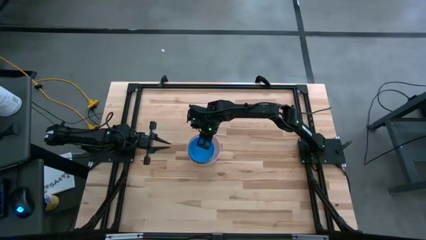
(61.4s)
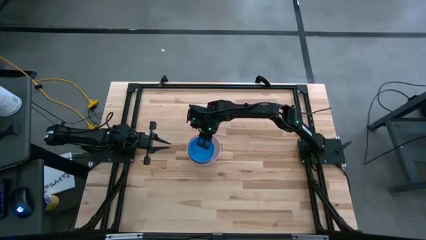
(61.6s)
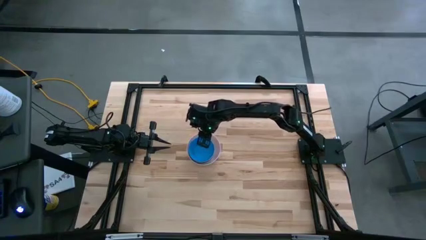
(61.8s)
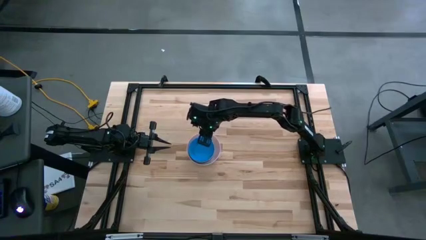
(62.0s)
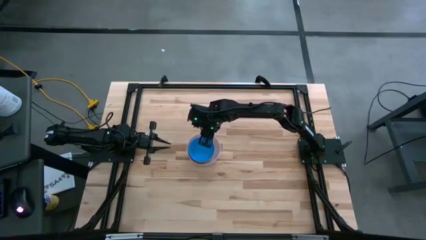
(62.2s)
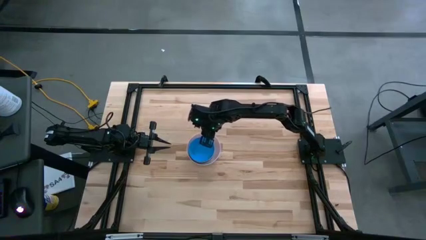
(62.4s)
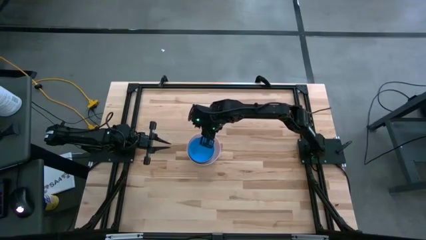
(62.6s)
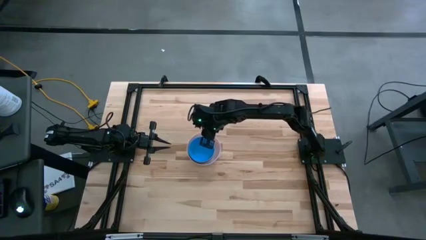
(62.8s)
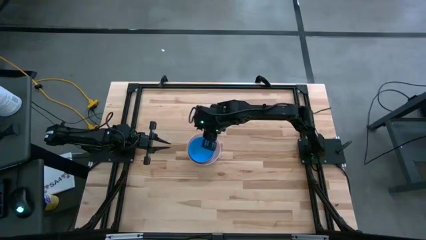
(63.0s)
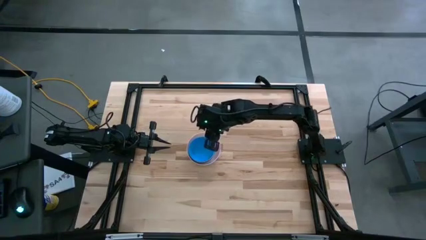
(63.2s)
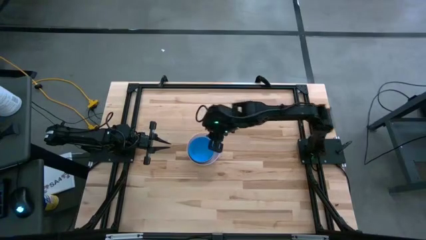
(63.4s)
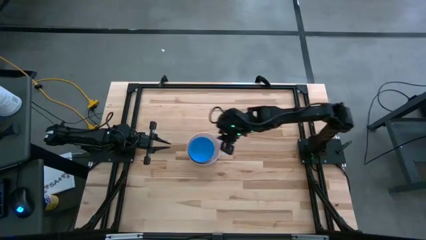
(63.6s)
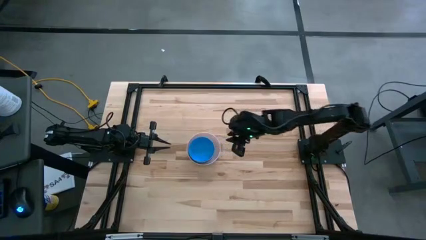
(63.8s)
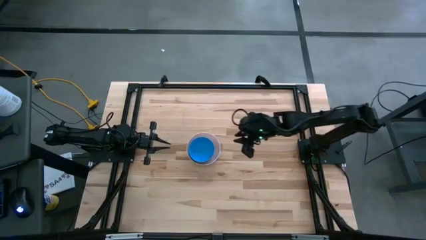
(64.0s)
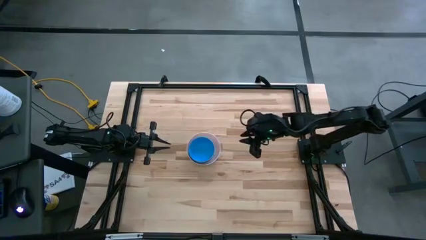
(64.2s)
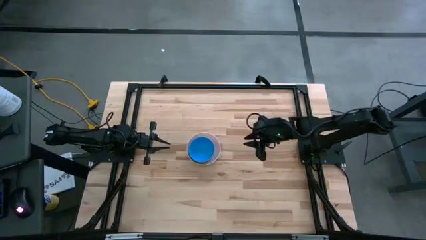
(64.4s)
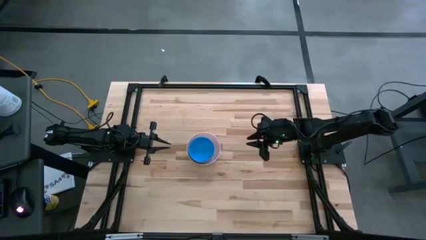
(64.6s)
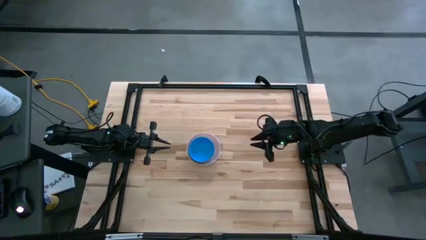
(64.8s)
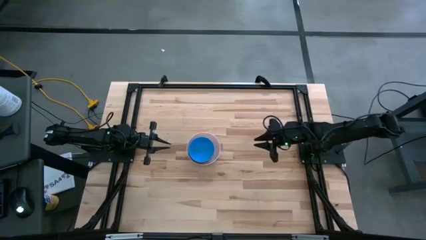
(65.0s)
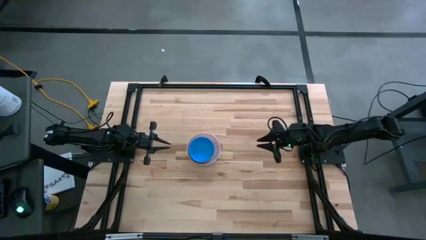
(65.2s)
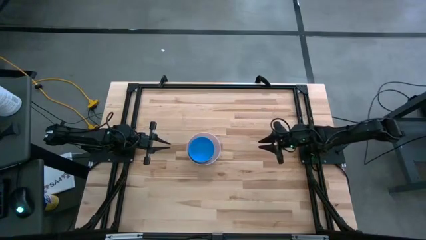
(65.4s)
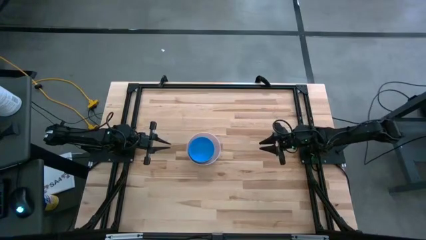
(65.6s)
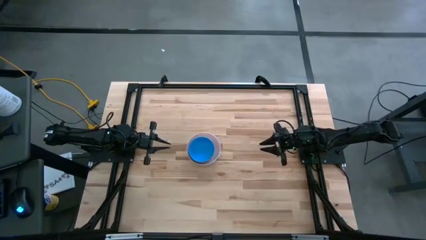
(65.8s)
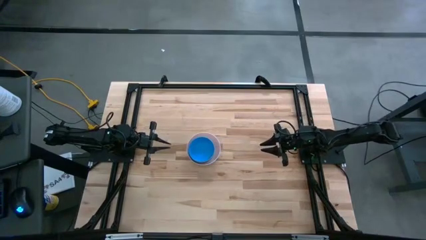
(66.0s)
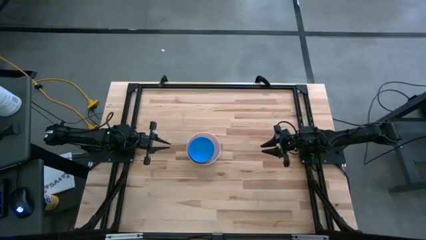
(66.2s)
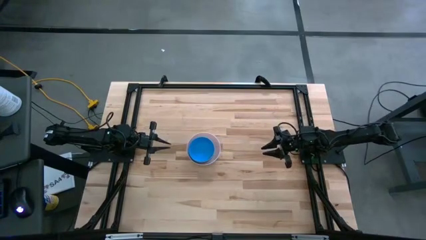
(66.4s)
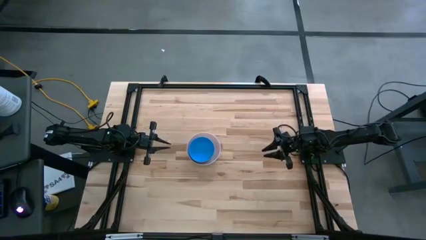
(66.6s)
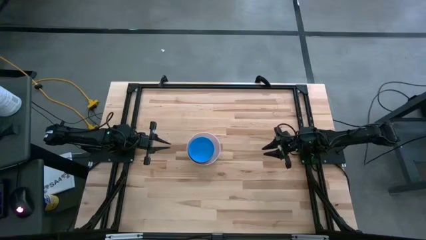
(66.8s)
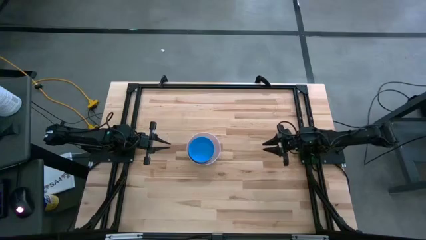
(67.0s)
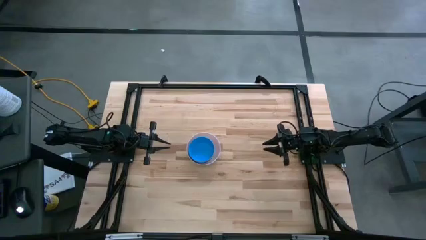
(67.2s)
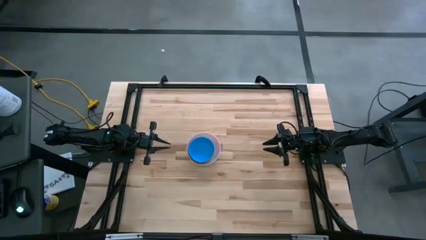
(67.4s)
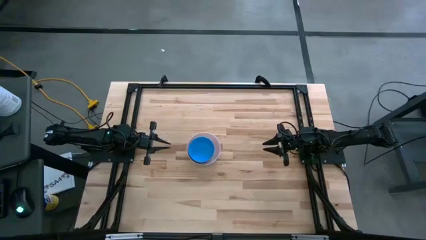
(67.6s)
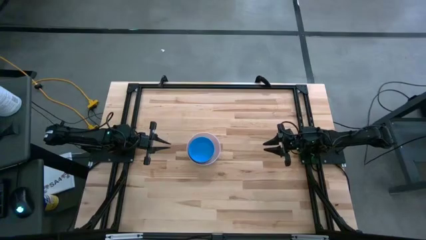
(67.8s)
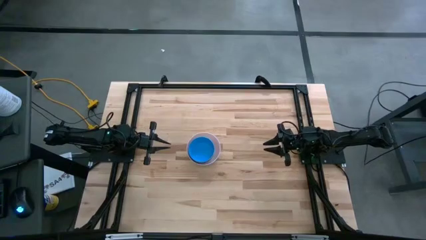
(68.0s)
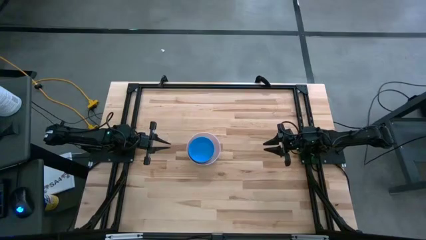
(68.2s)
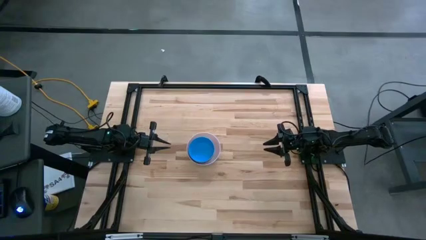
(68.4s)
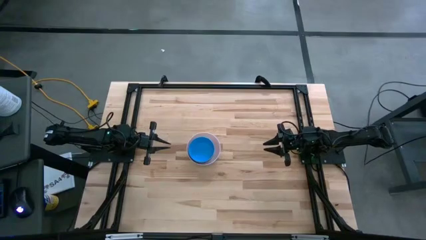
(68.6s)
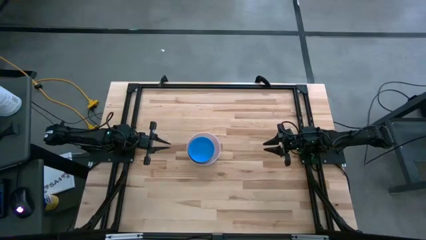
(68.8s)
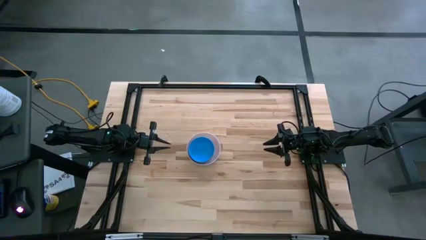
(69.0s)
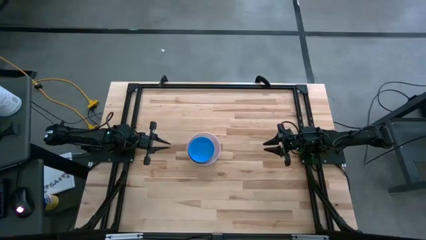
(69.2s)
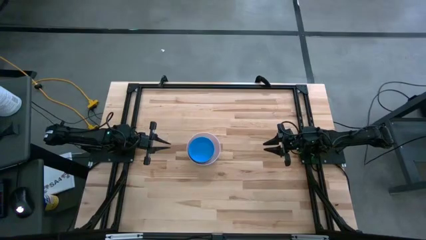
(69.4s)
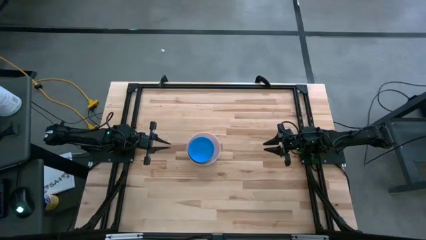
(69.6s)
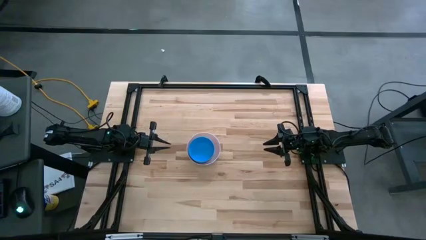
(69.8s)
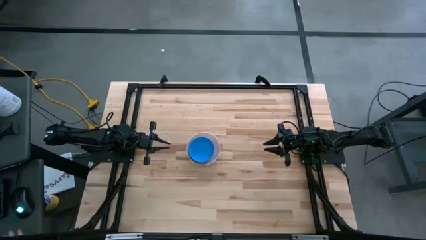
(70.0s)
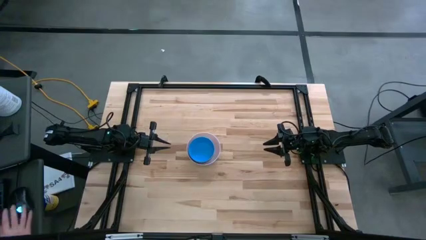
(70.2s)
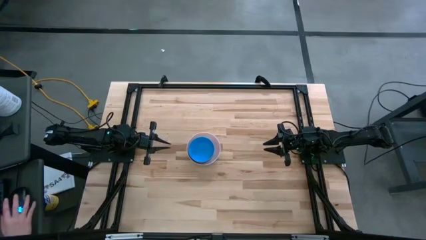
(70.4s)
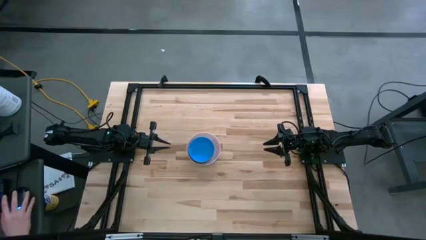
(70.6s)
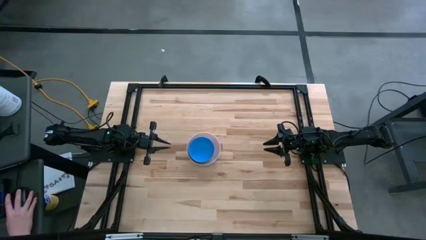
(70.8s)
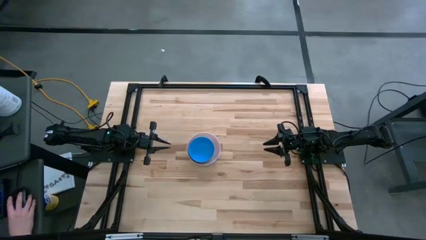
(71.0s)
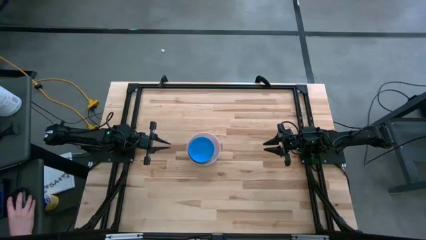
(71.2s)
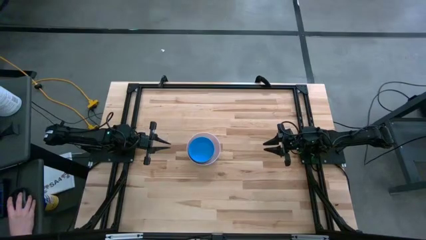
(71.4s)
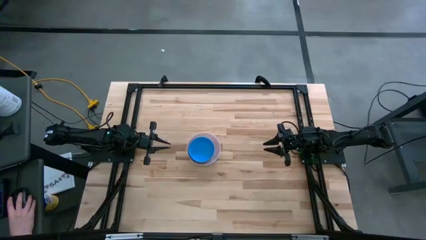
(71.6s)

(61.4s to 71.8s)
Return to Home Position

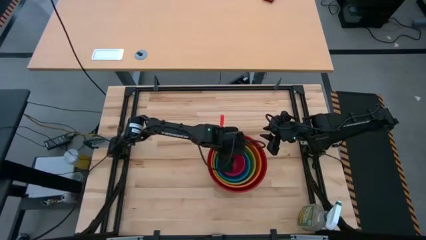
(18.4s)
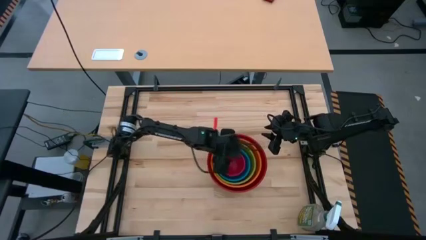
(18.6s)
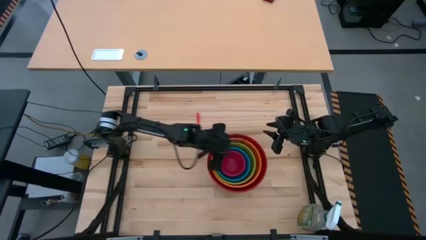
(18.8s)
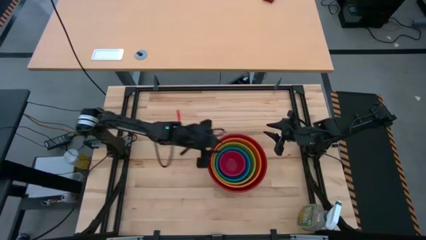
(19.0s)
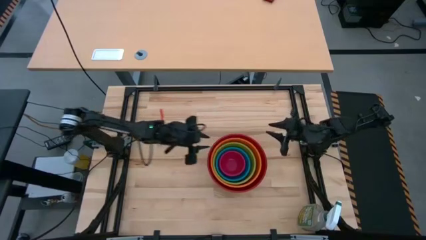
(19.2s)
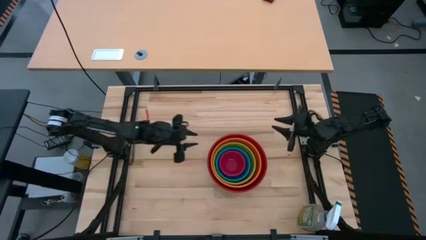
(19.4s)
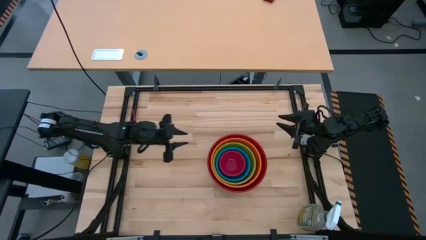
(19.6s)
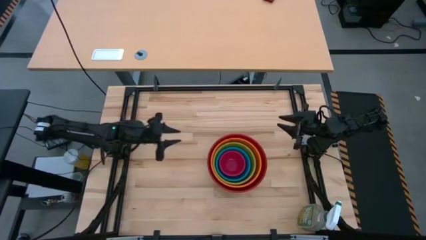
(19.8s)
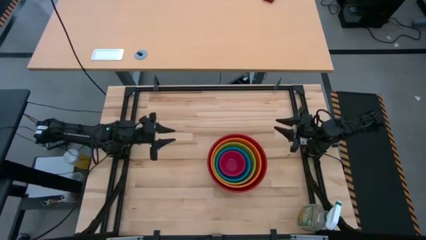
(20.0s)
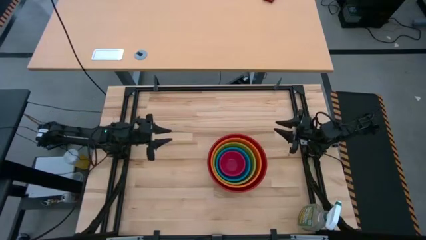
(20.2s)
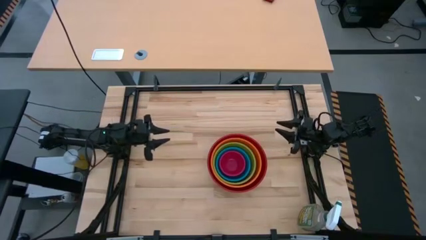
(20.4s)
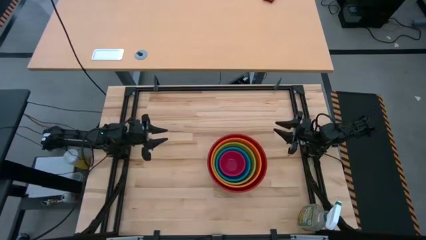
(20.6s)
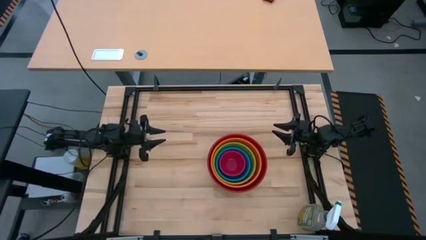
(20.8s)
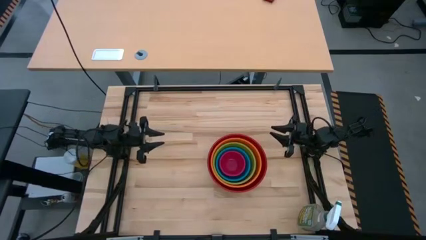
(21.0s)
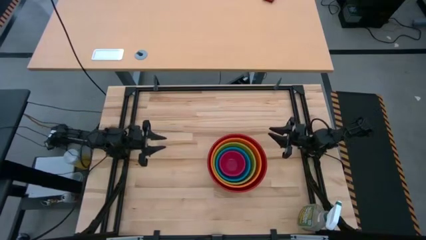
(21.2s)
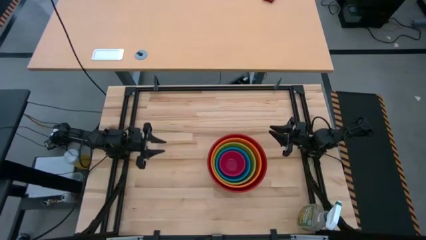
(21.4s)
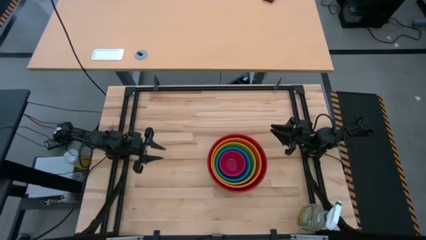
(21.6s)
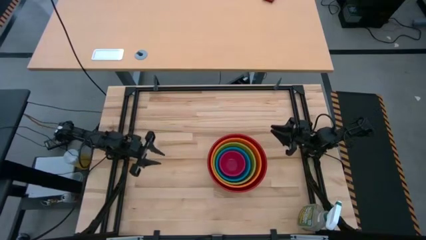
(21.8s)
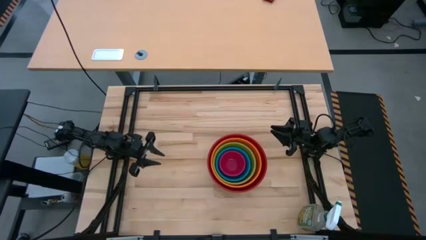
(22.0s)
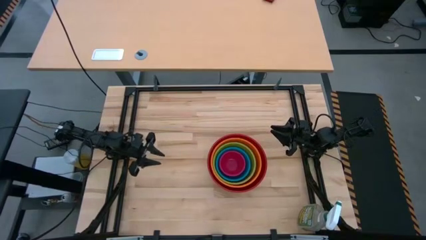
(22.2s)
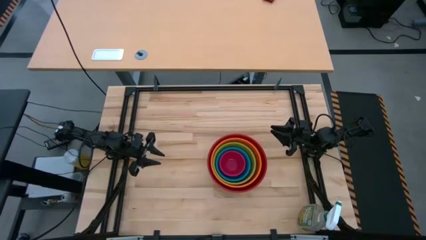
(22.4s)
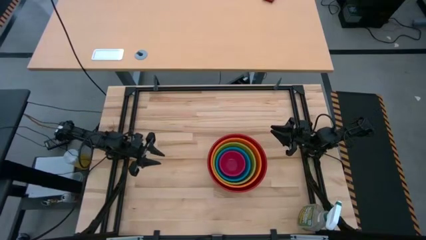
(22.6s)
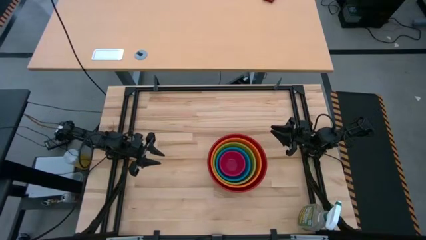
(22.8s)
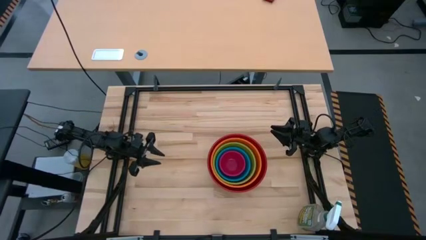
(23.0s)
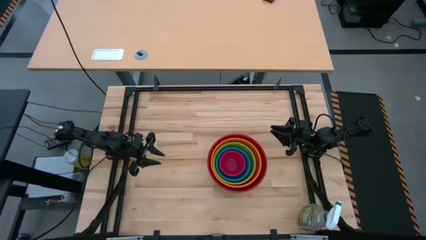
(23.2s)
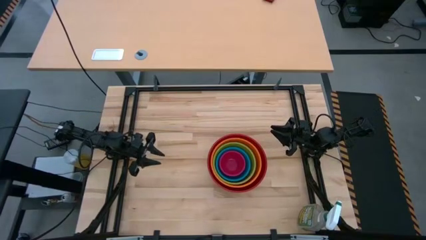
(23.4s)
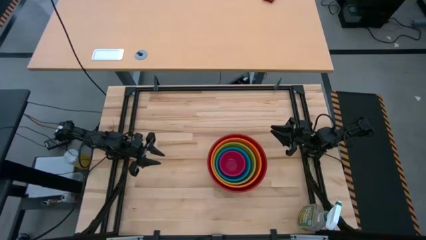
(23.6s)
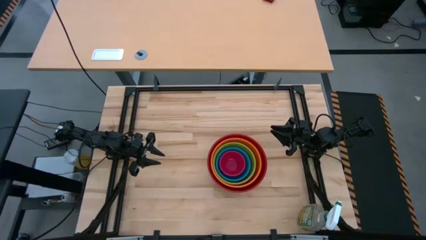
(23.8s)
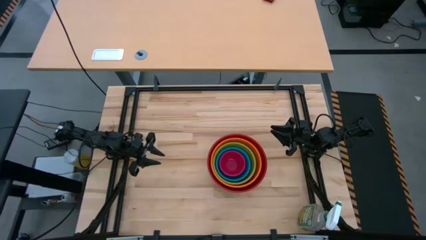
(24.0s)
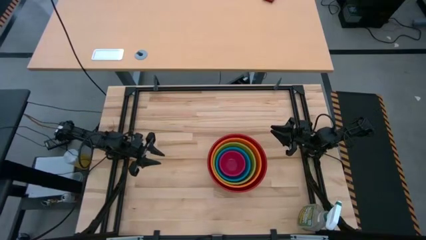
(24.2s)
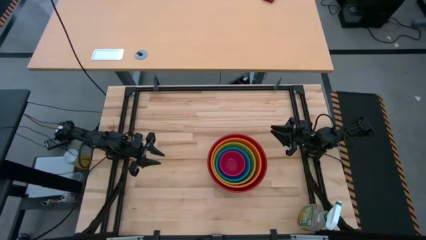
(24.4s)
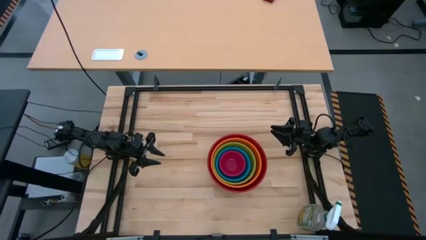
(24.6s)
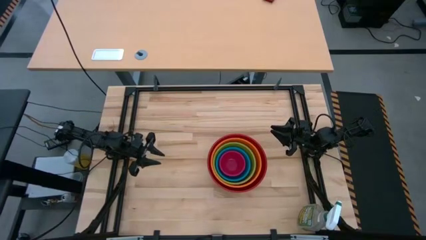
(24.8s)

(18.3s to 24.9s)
Return to Home Position
